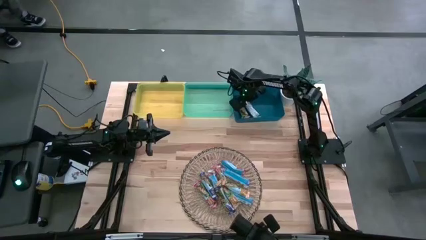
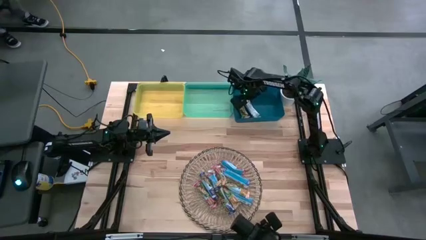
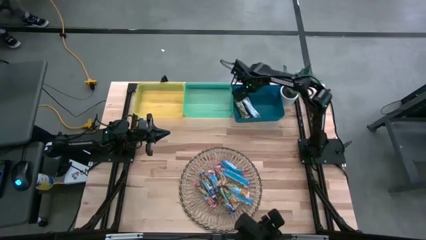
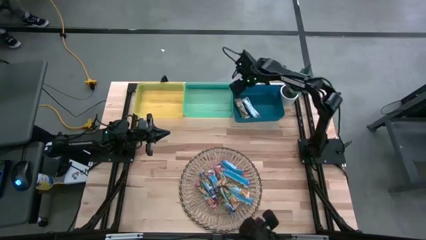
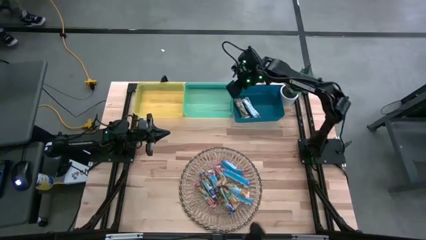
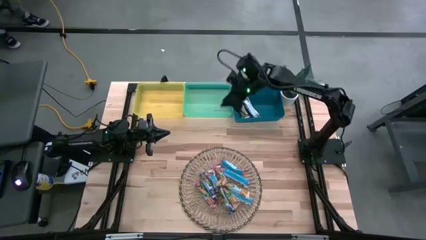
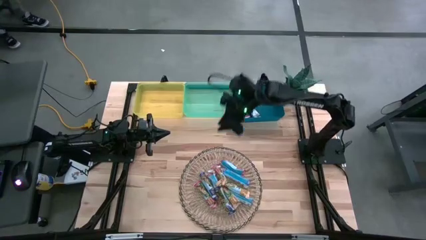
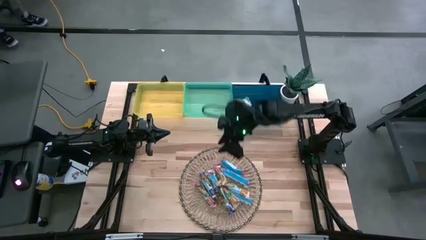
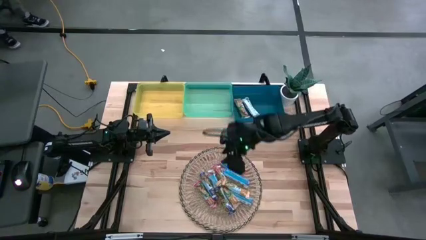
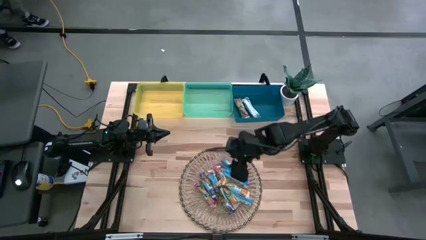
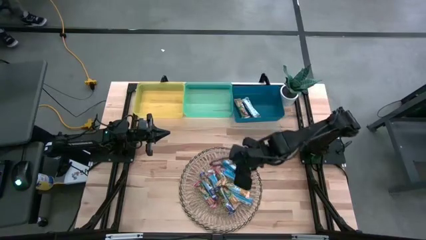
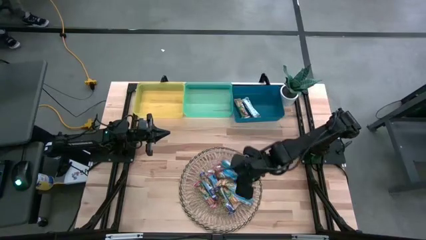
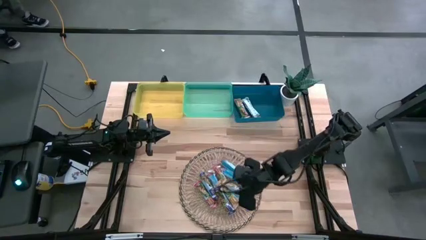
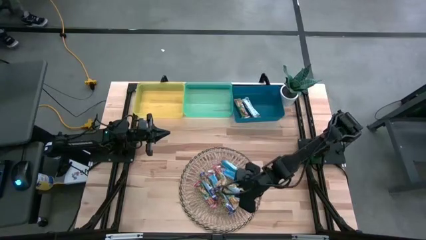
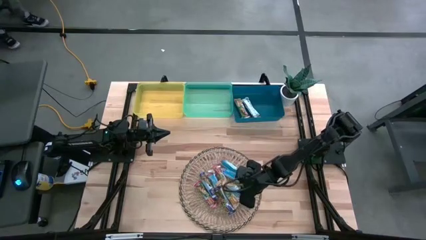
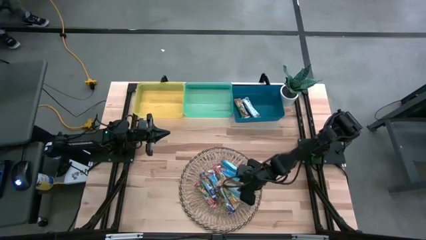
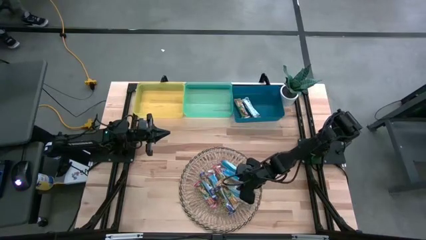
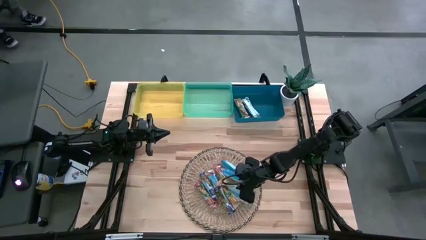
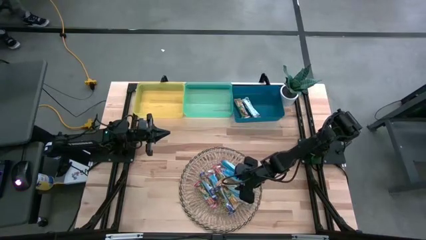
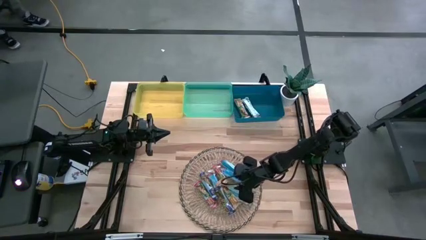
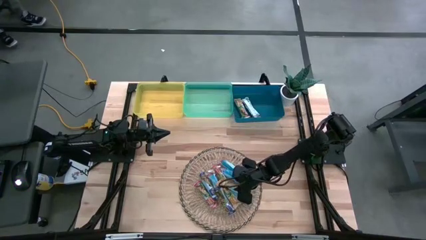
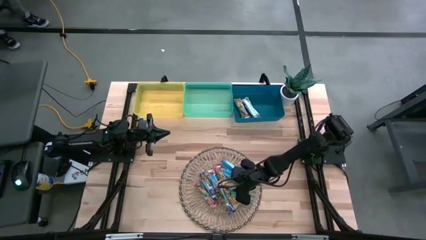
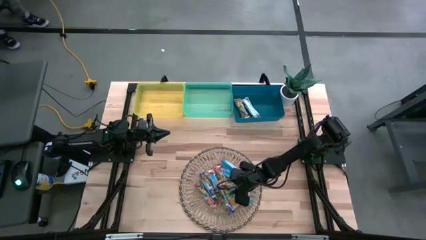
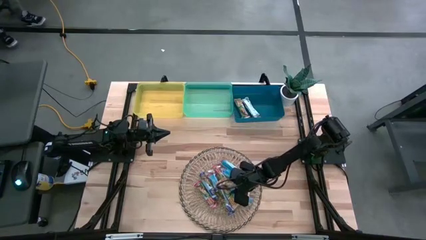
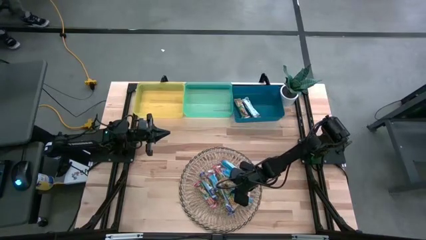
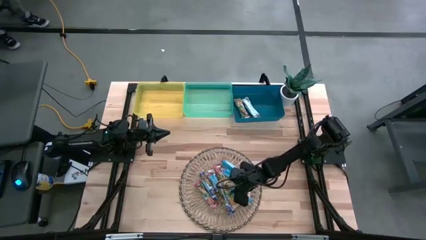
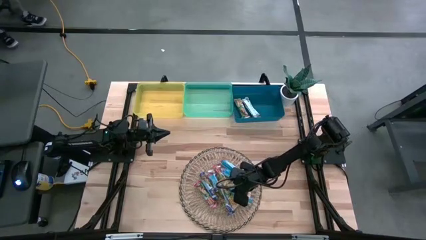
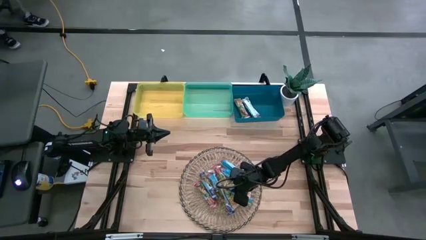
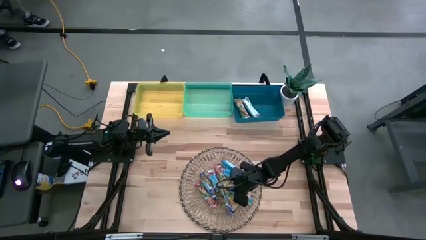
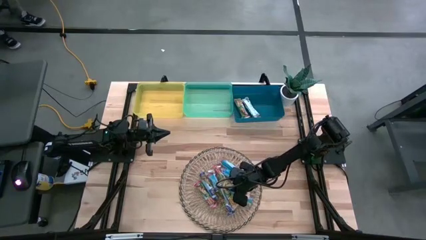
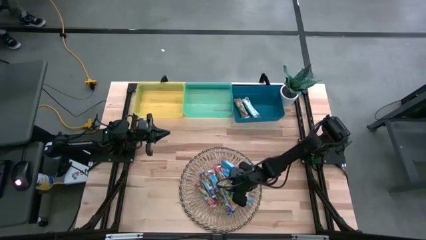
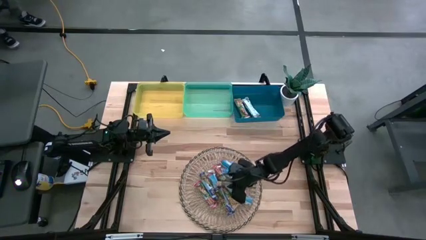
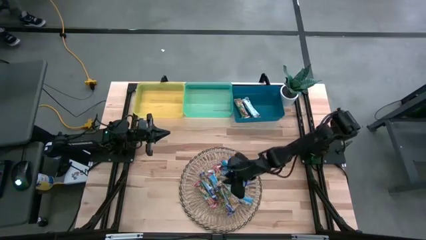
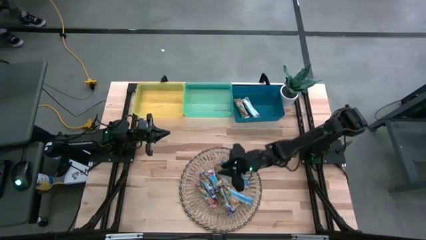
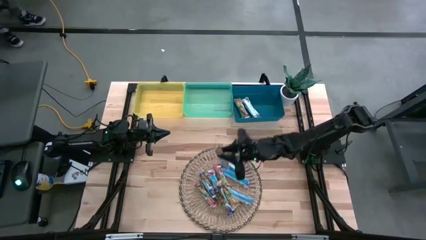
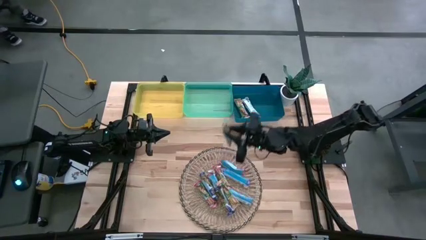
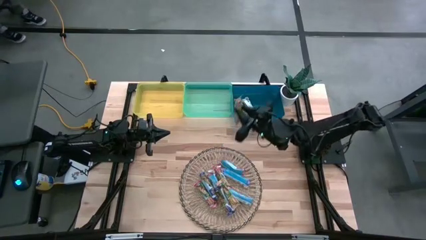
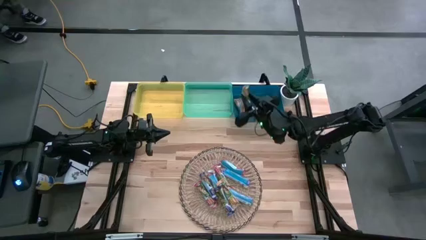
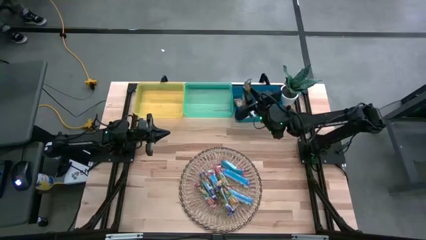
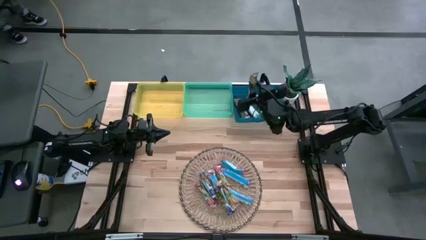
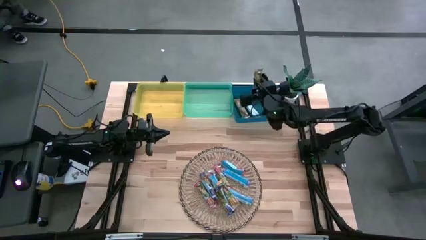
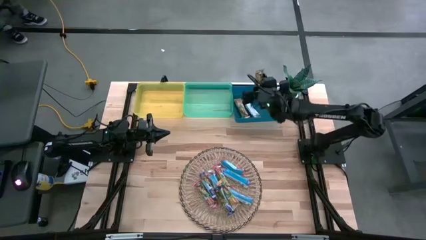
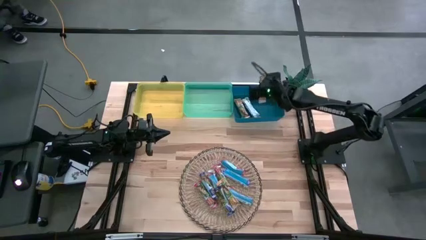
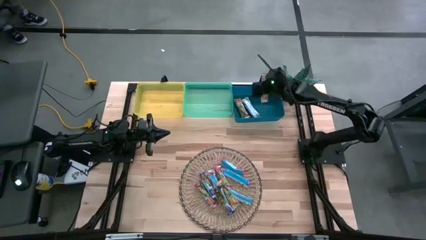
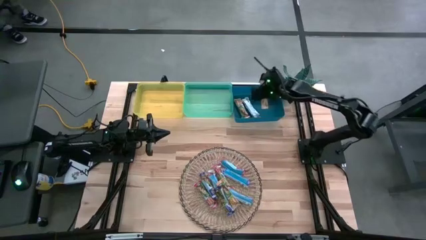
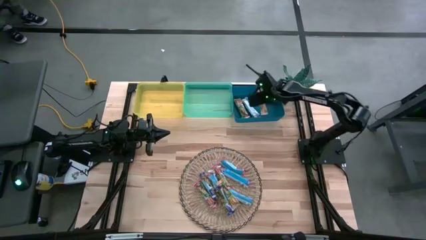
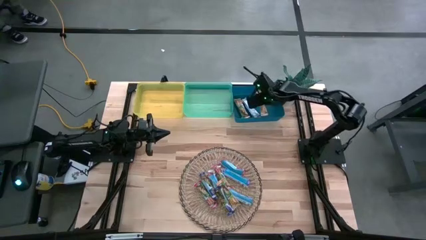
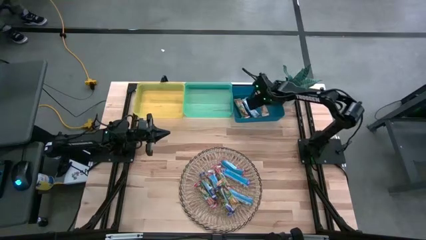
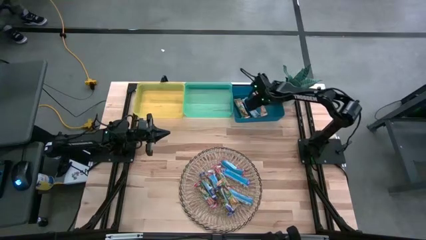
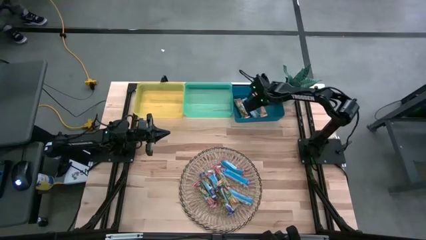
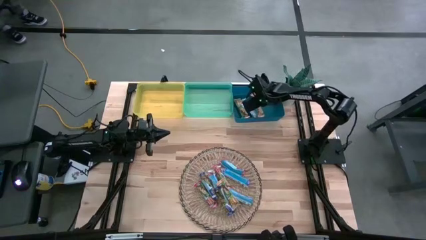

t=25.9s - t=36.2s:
Task: Pick and place Granola Bars by type
Put the orange granola bar into the blue bin
